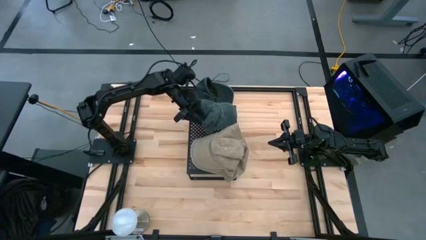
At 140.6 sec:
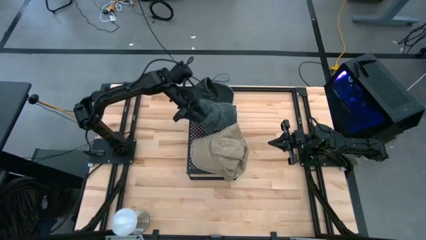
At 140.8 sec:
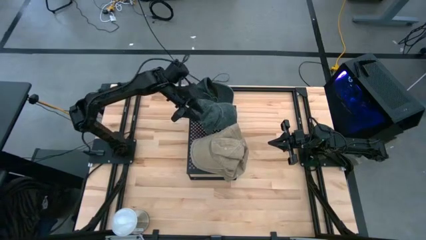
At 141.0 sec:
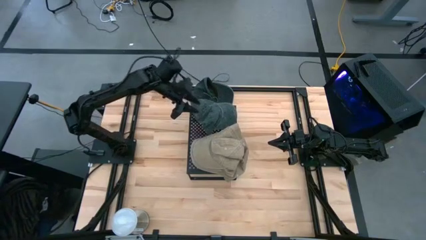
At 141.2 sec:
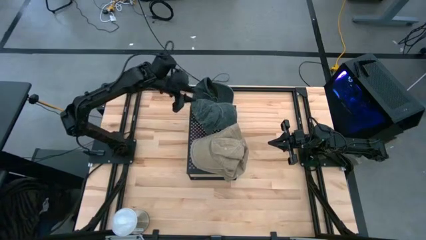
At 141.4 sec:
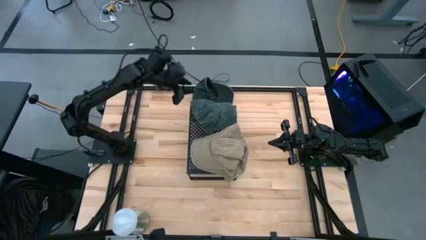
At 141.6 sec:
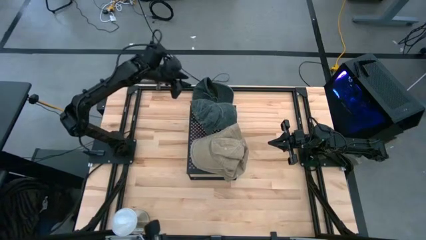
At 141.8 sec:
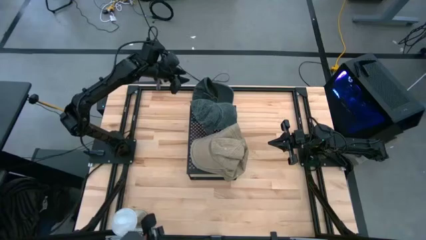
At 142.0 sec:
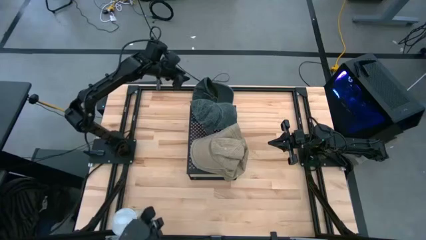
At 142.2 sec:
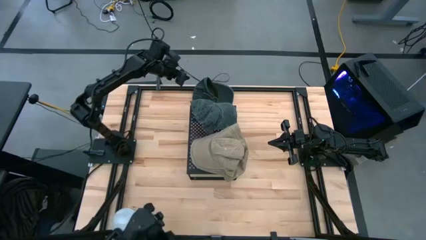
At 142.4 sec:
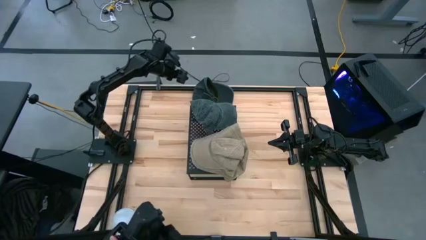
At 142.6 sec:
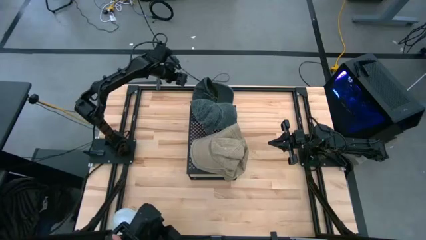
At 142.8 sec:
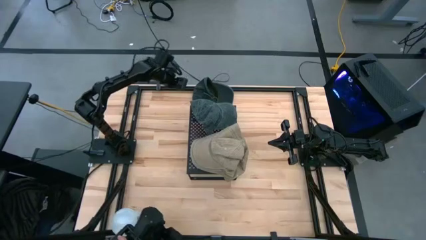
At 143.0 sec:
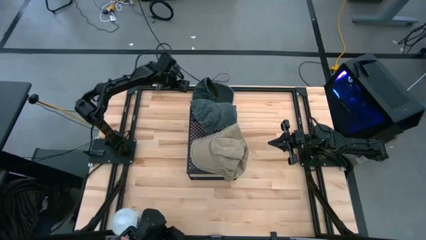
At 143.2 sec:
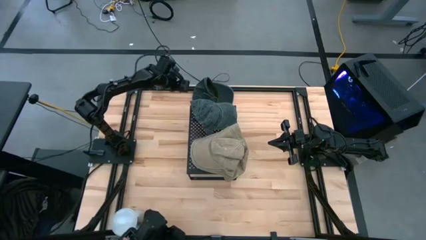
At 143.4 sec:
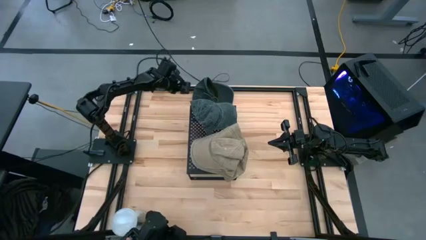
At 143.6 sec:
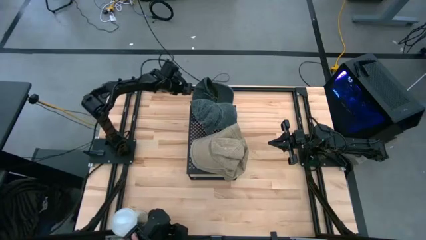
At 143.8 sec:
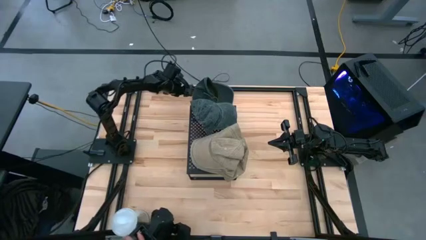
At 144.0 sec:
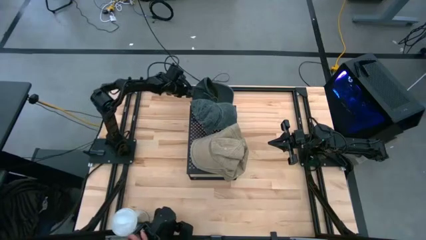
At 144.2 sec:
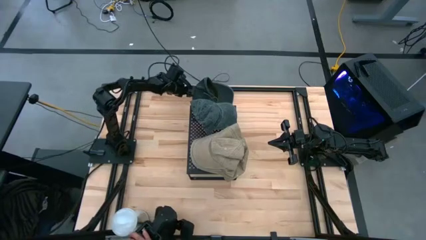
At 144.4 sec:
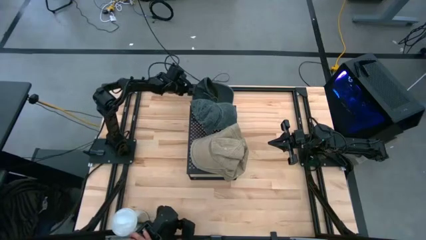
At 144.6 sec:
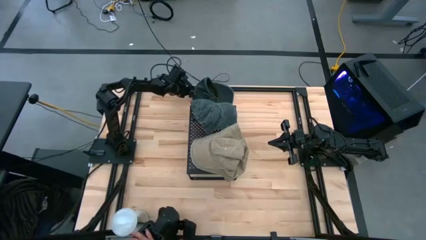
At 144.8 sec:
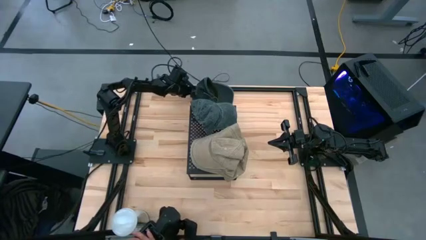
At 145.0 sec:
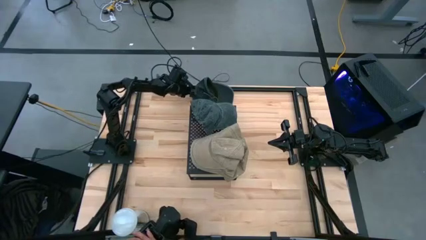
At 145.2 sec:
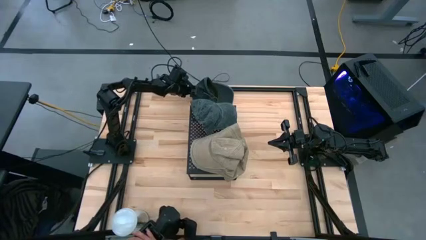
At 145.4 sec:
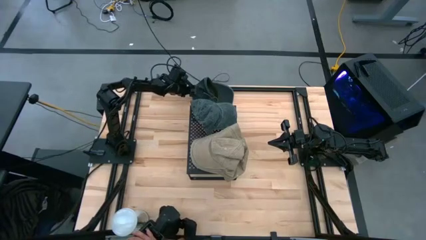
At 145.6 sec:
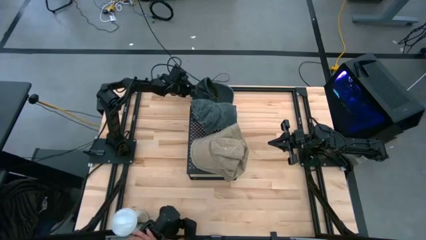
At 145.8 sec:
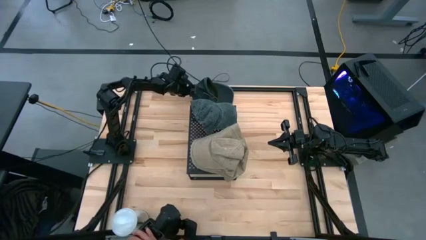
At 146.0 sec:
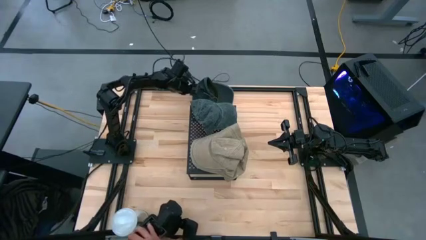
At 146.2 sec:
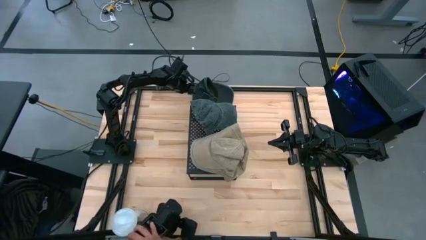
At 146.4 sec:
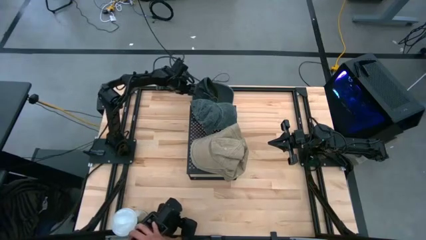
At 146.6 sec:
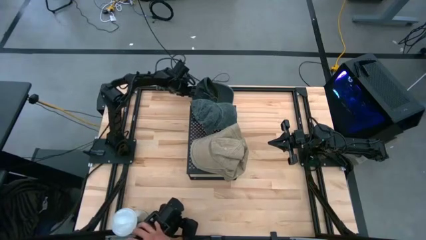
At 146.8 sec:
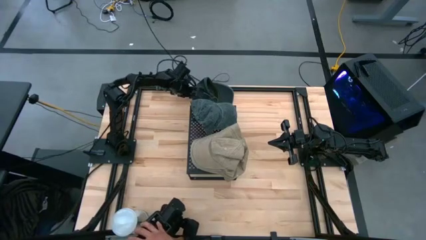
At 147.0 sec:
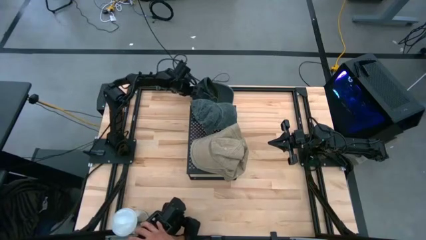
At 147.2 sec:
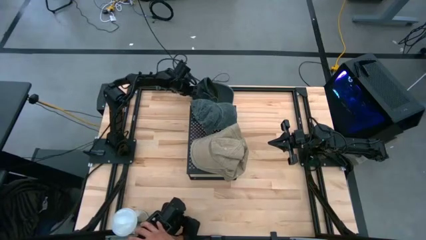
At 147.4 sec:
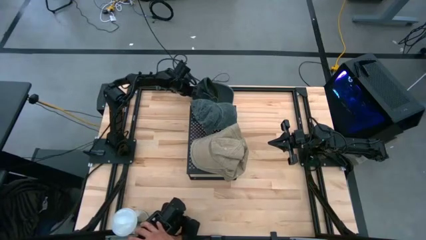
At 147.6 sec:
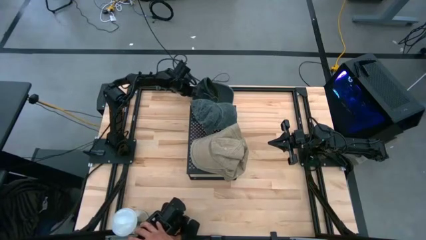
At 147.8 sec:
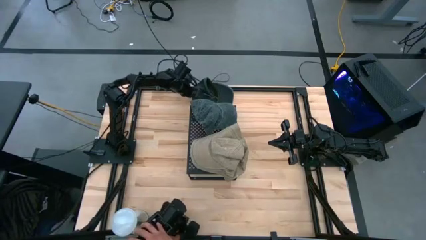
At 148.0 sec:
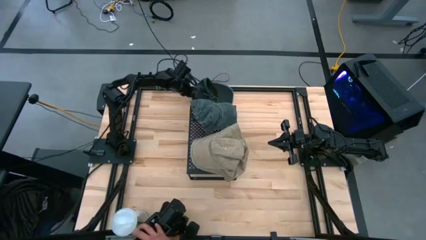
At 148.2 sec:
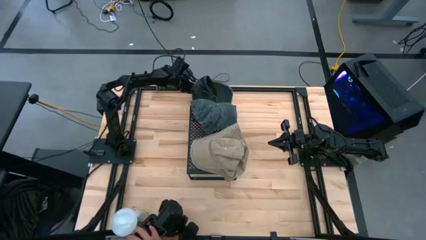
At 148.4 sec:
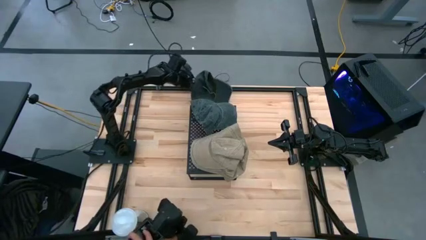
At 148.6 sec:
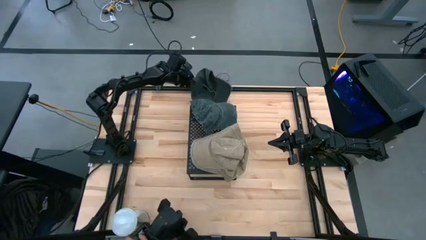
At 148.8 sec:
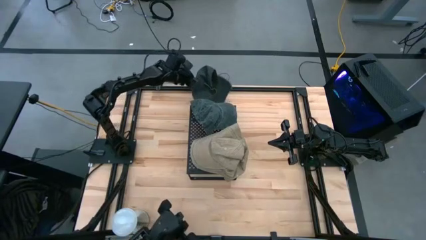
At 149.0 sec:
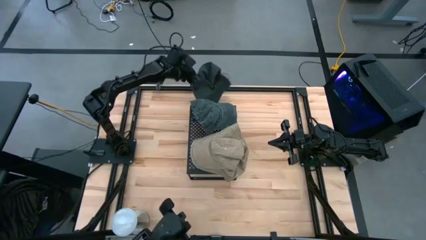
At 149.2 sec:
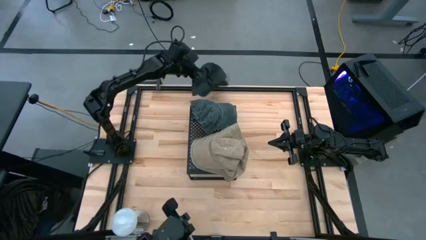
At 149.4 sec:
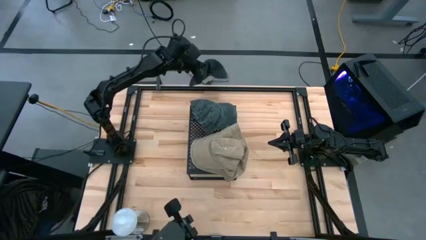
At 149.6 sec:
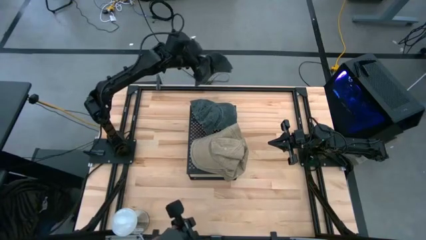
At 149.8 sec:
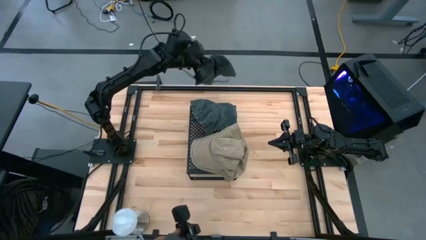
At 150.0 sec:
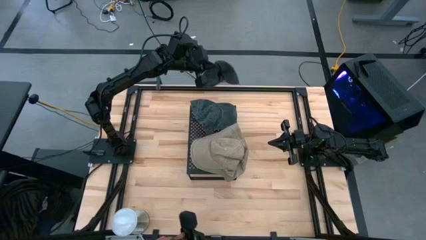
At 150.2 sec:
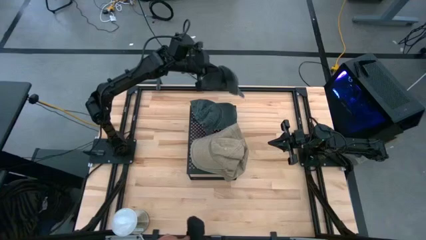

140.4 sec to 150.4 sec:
Task: Pick & Place hat
Stack the gray cap on top of the other gray cap on the shelf
